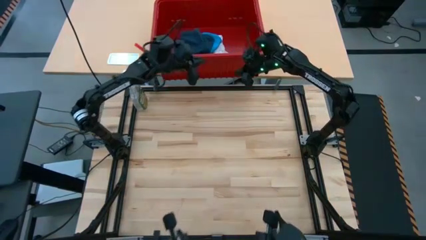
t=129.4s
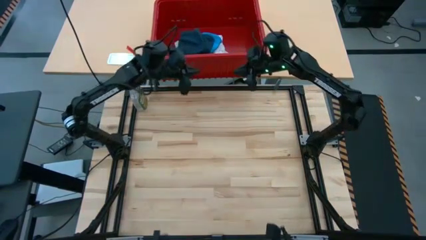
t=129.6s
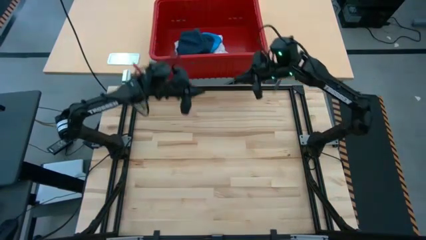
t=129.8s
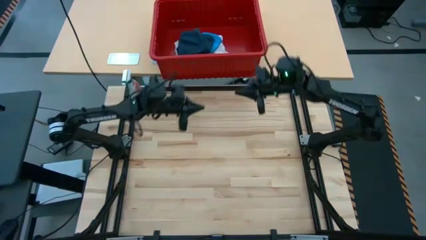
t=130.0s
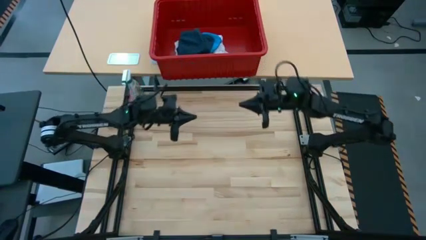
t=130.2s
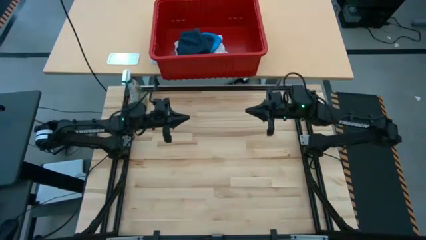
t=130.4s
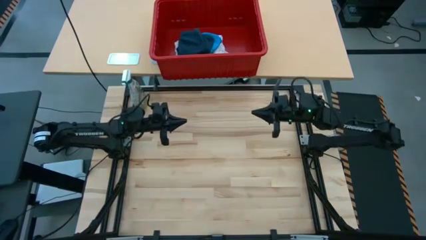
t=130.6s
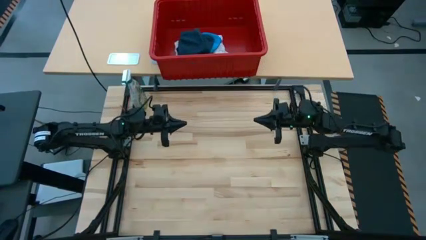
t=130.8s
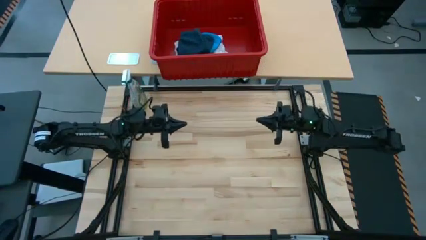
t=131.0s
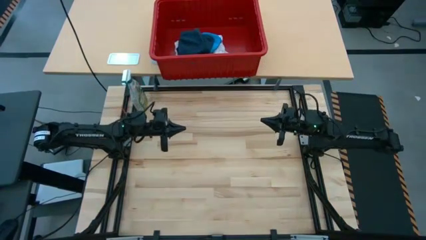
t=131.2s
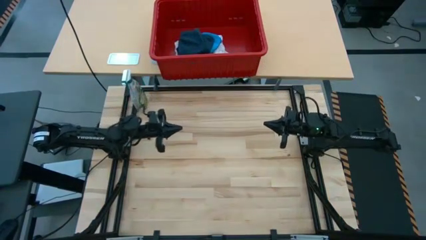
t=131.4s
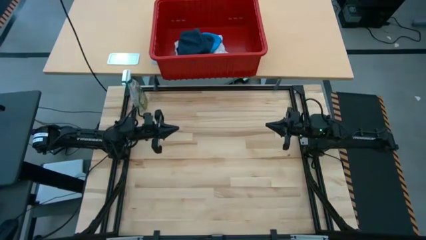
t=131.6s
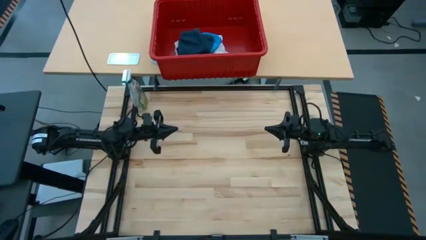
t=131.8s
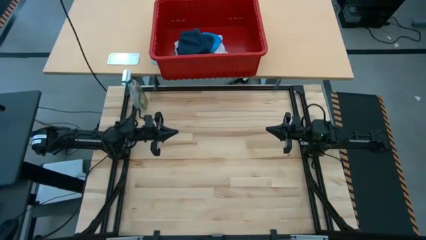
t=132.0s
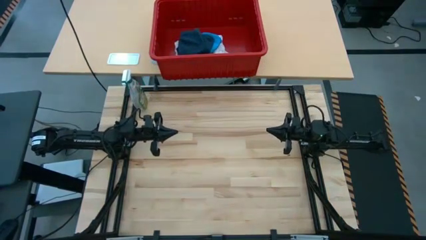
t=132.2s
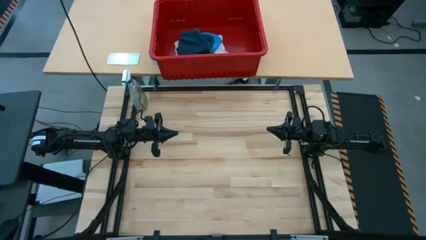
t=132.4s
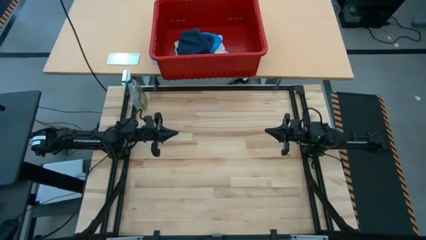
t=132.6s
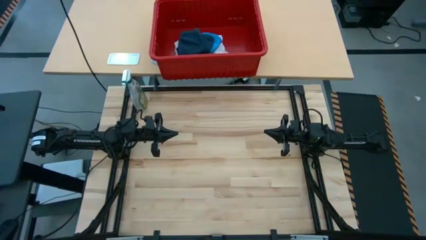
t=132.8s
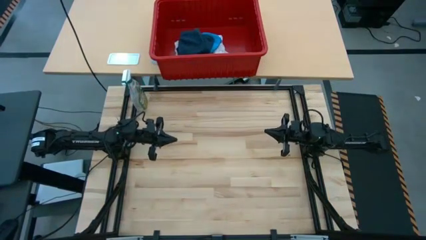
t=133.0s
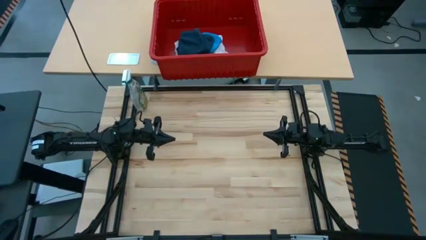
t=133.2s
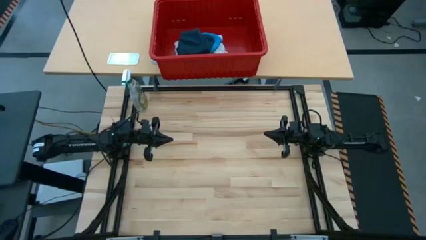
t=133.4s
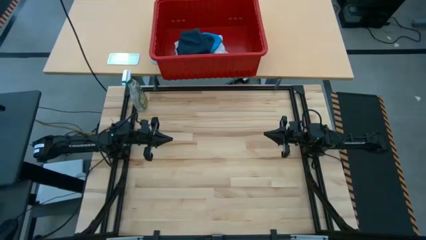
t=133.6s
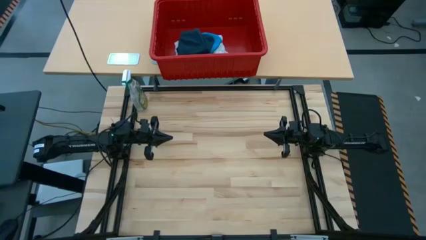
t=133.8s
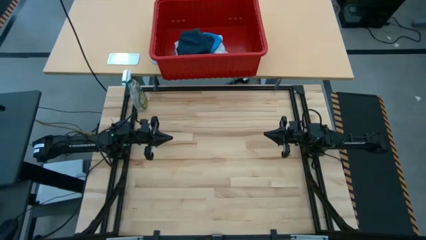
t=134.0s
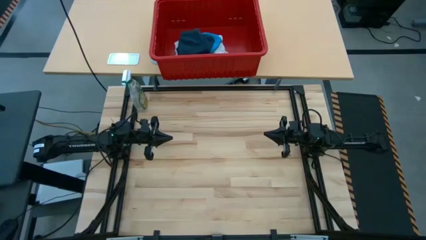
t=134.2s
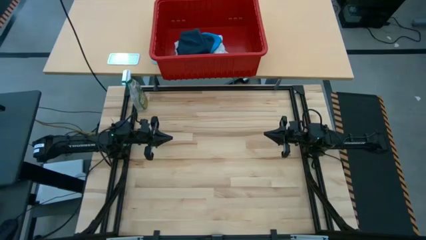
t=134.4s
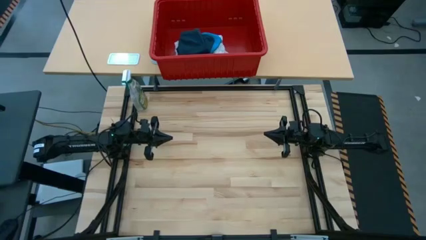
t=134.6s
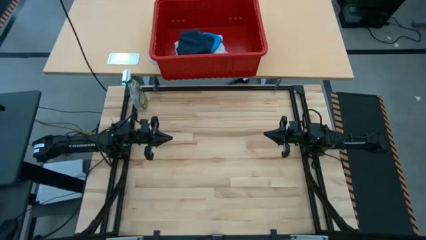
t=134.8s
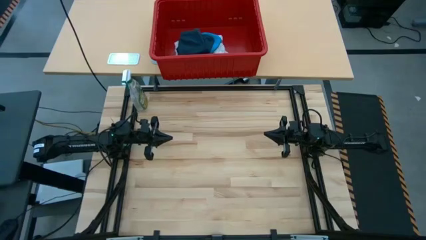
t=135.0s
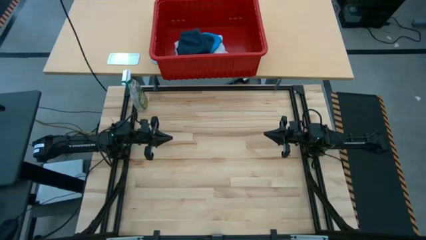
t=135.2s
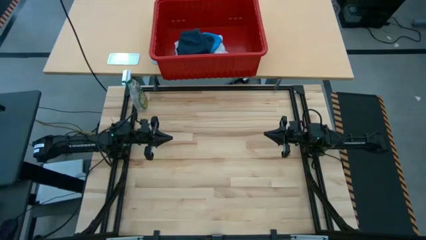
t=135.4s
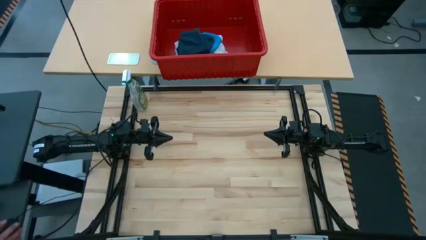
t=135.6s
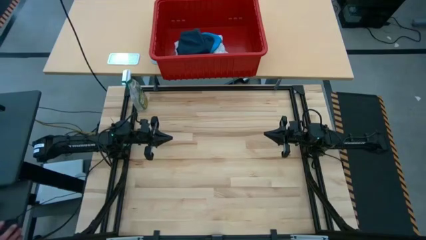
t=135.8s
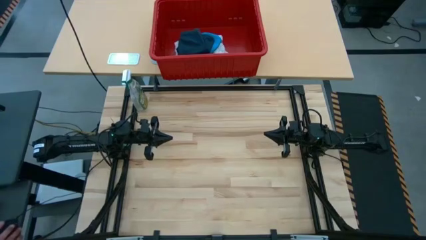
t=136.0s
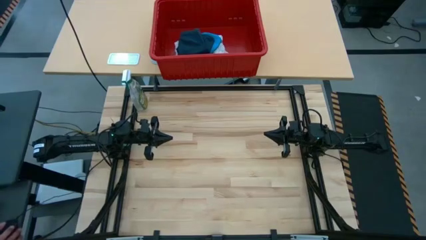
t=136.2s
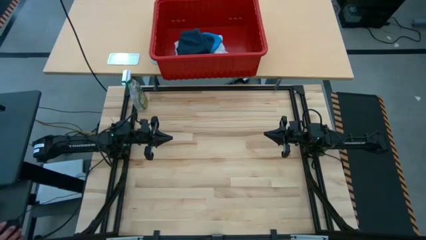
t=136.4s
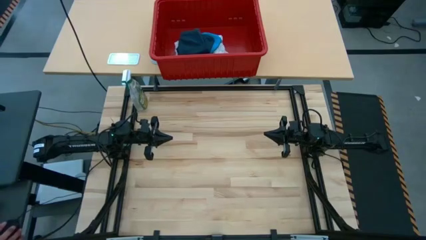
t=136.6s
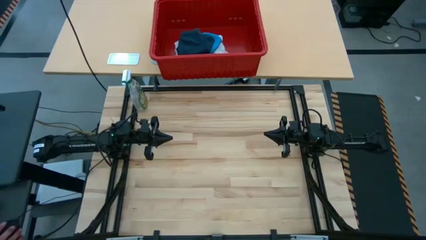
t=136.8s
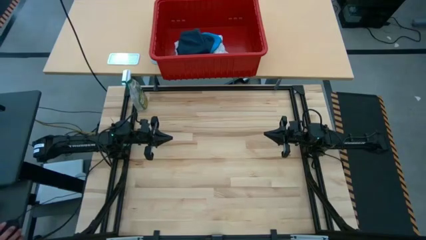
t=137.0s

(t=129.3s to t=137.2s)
Task: Fold laundry
Return to Home Position

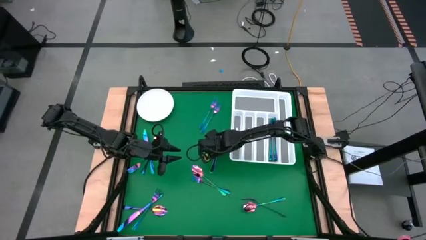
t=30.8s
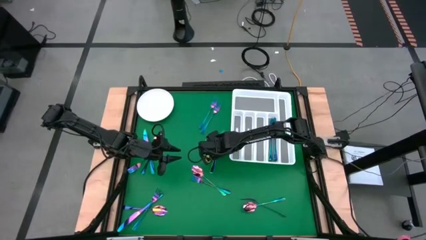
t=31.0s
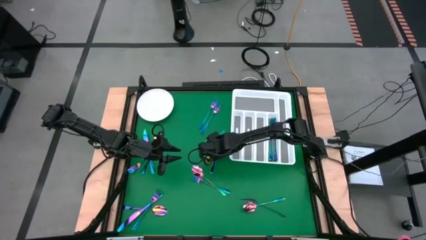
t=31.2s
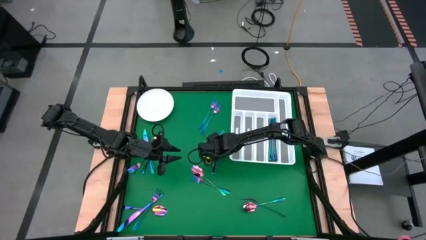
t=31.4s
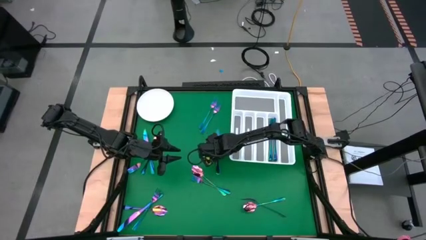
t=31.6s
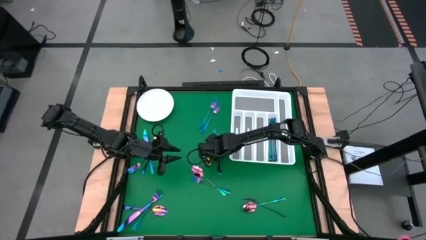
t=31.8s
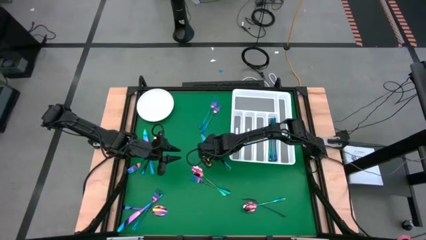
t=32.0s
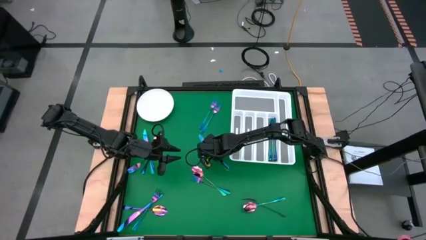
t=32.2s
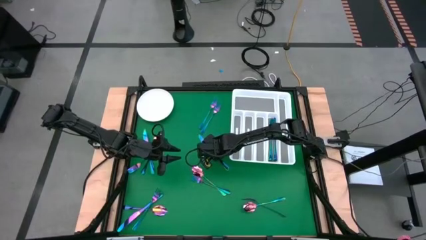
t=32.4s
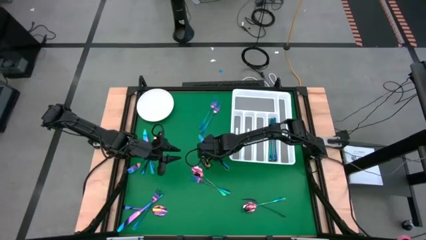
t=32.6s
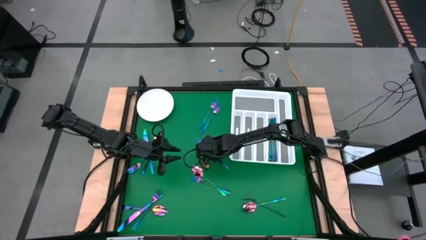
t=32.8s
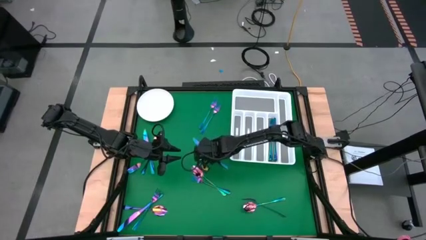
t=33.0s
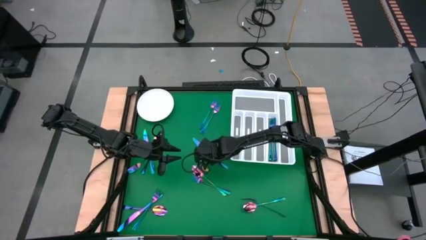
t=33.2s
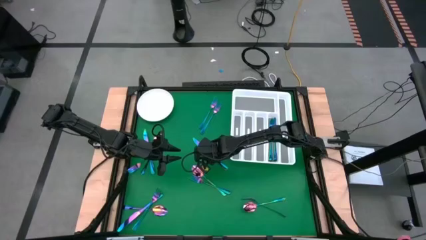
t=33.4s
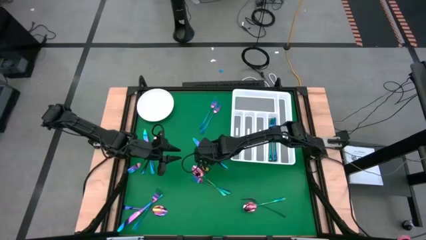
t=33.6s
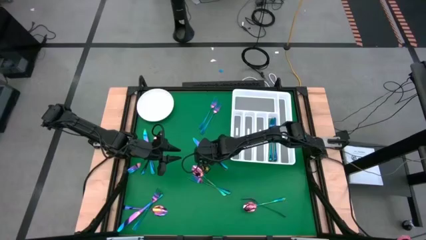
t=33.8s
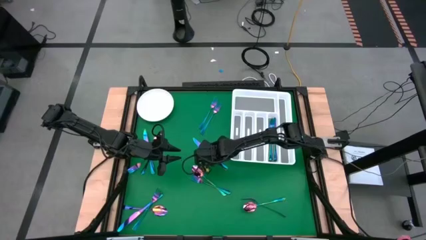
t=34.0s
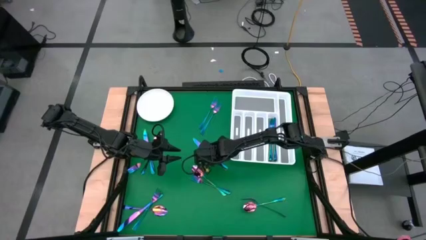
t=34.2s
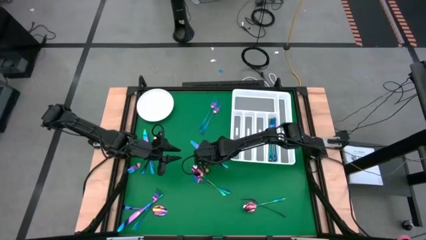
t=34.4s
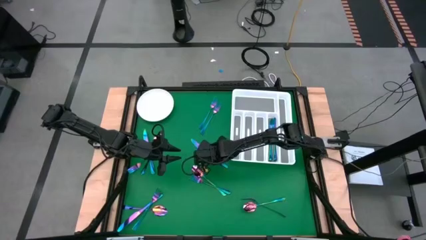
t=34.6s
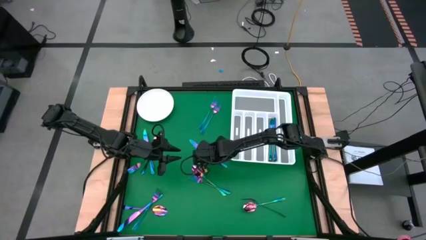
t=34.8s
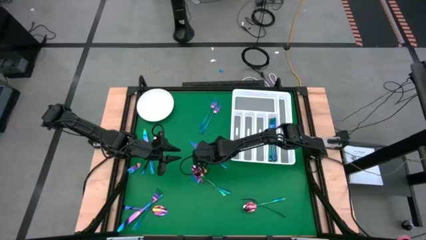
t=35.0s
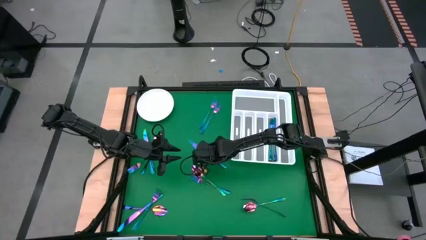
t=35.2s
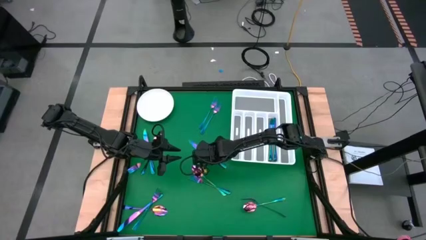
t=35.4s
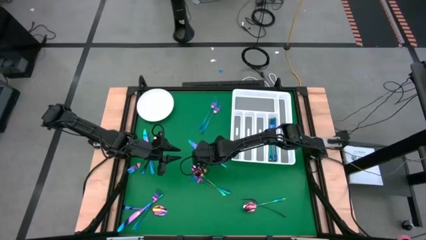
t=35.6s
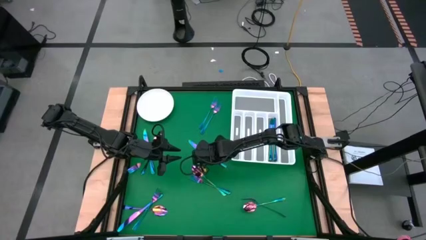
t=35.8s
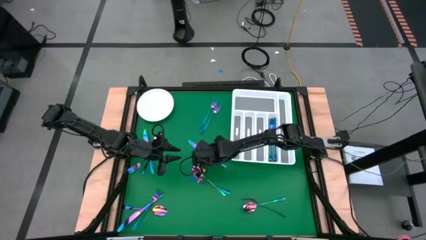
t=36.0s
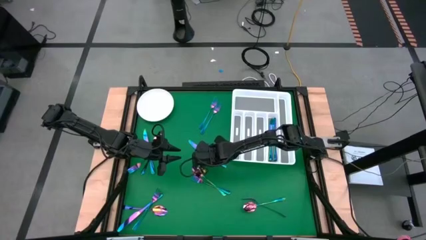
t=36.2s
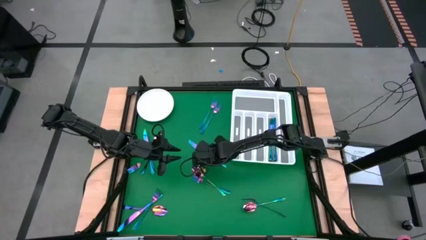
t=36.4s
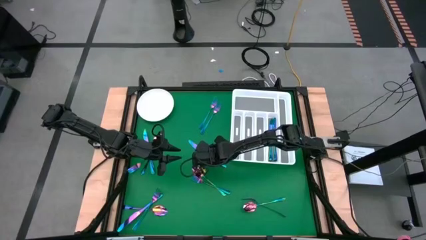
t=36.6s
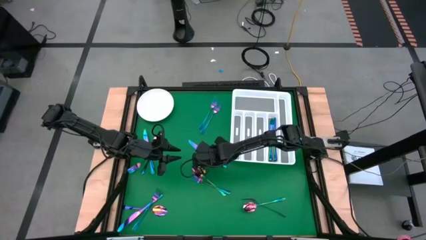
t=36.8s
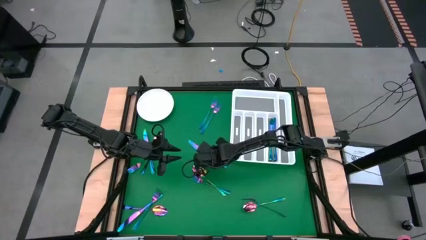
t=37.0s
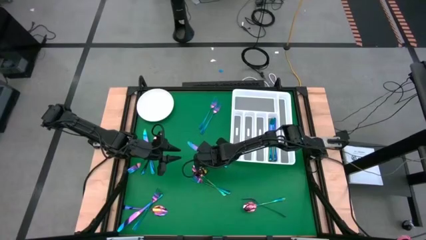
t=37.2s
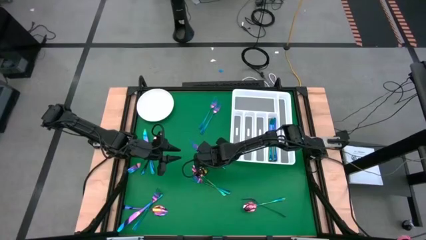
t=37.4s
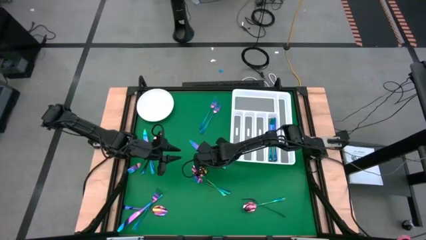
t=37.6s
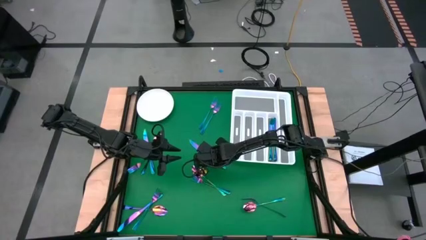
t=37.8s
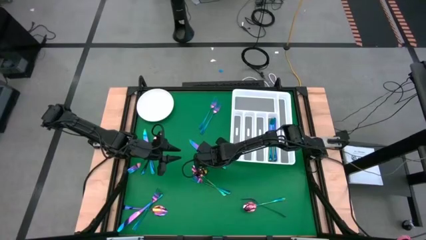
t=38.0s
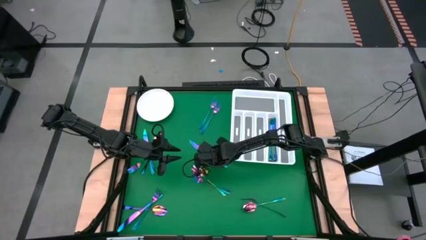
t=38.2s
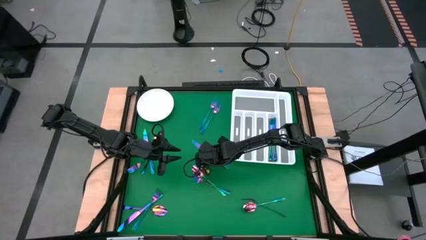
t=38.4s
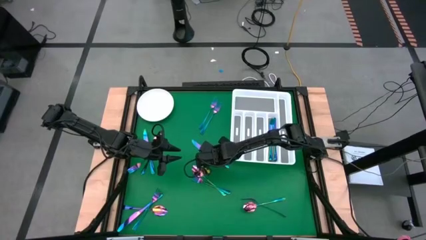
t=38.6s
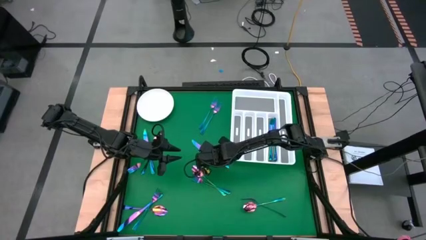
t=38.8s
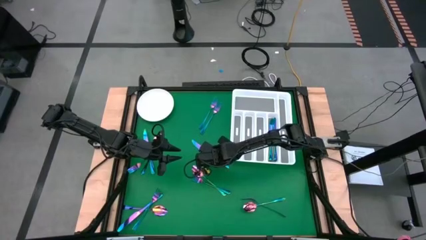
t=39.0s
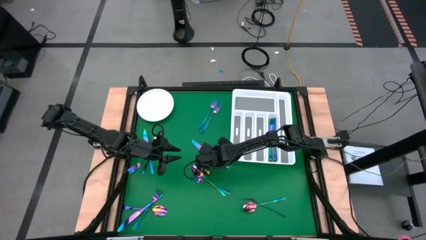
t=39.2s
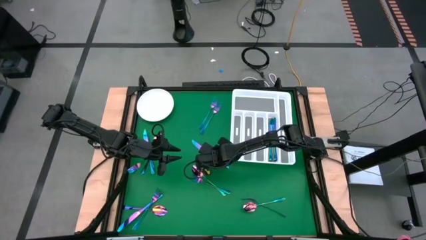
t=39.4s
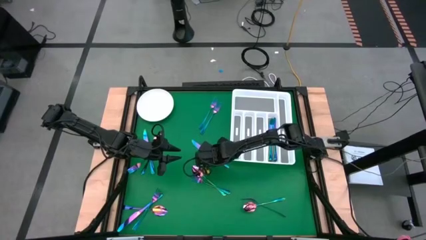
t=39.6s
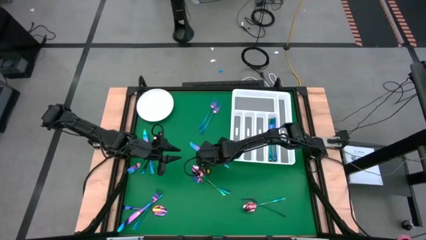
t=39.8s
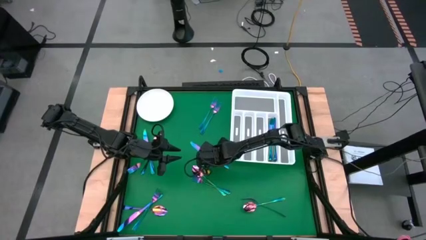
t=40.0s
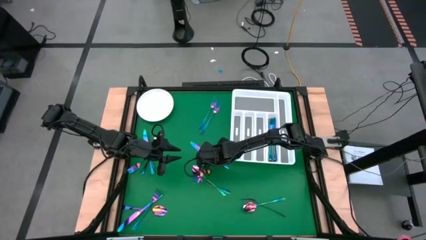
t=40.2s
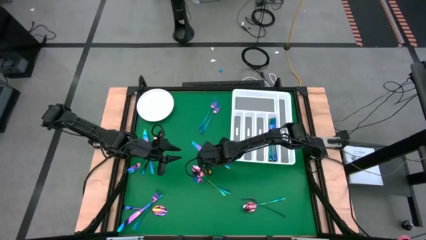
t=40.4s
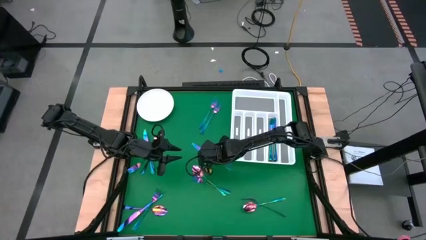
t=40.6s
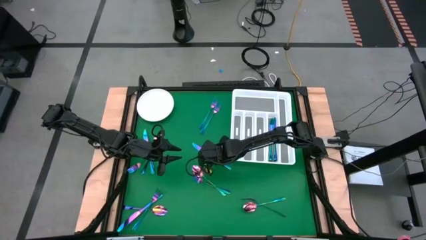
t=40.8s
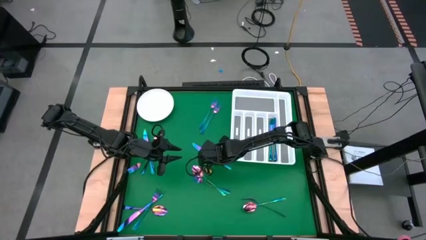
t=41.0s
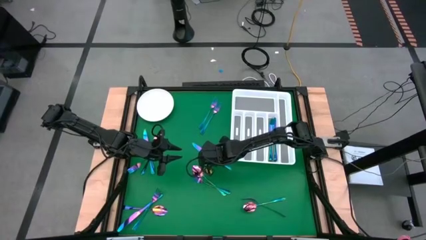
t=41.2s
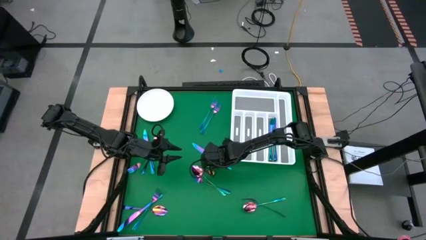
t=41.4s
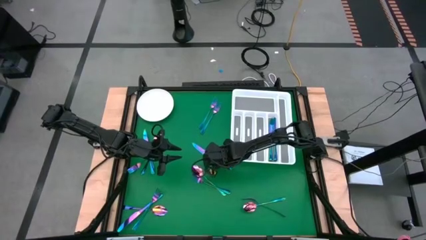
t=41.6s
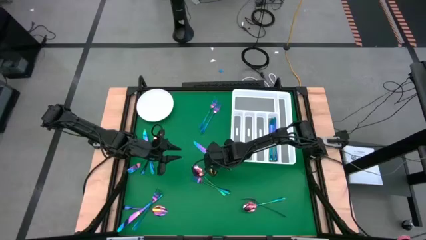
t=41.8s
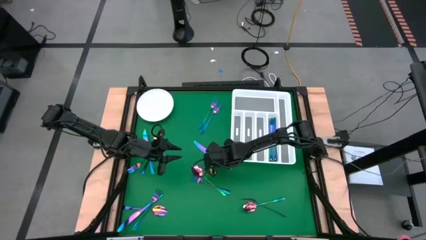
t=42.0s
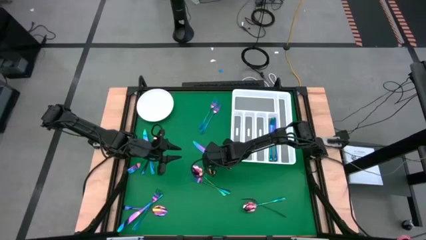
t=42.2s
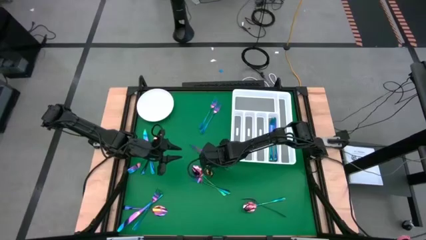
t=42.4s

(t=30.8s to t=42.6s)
Task: Sort silverware
Put the blue knife into the white cutlery tray
